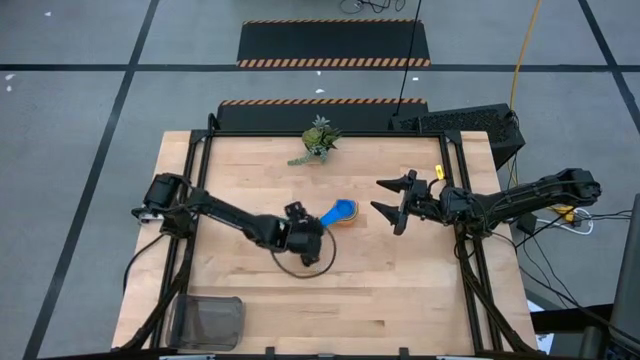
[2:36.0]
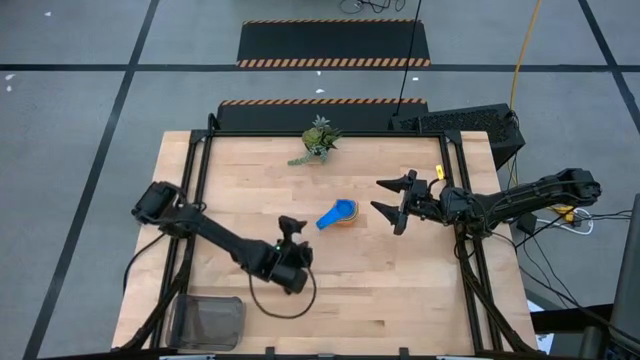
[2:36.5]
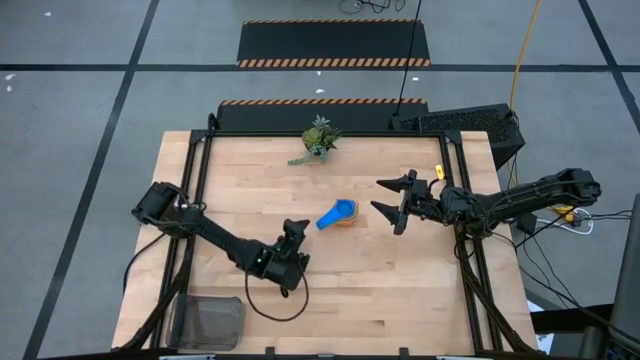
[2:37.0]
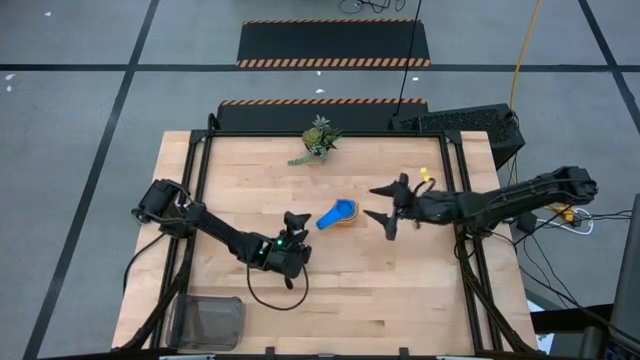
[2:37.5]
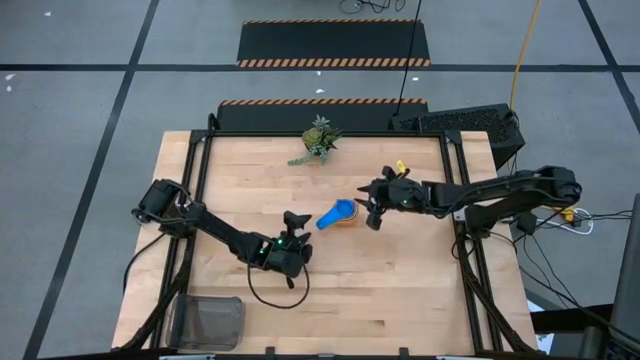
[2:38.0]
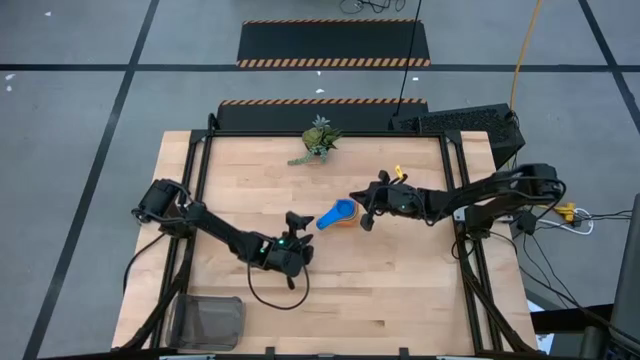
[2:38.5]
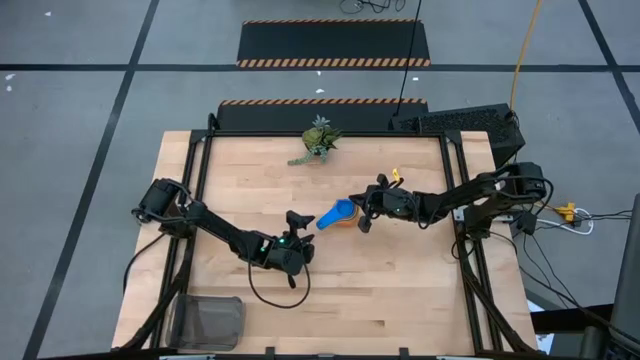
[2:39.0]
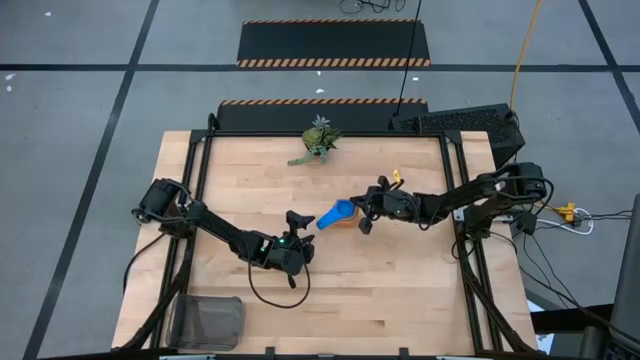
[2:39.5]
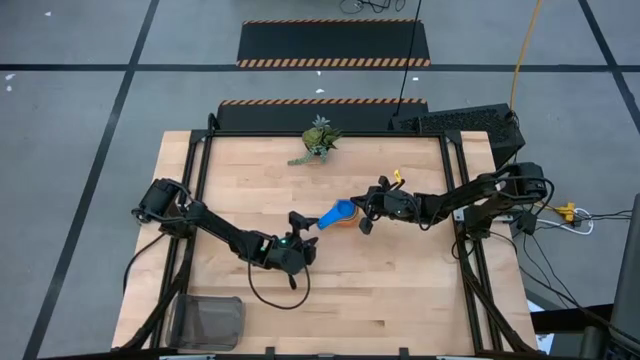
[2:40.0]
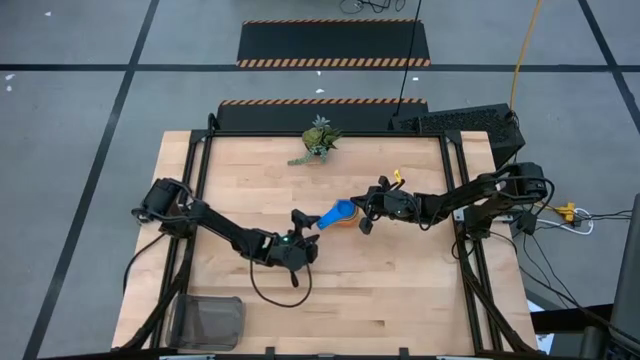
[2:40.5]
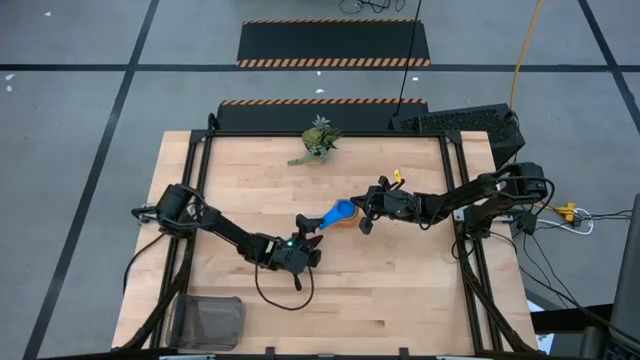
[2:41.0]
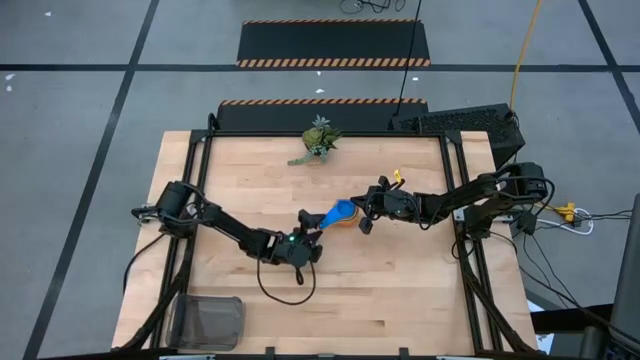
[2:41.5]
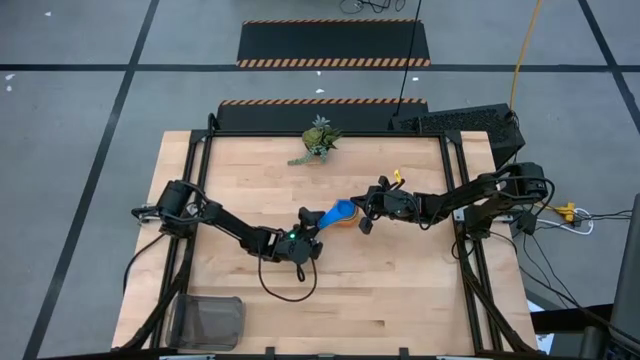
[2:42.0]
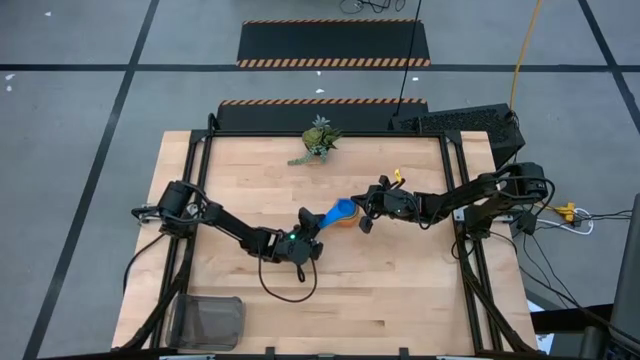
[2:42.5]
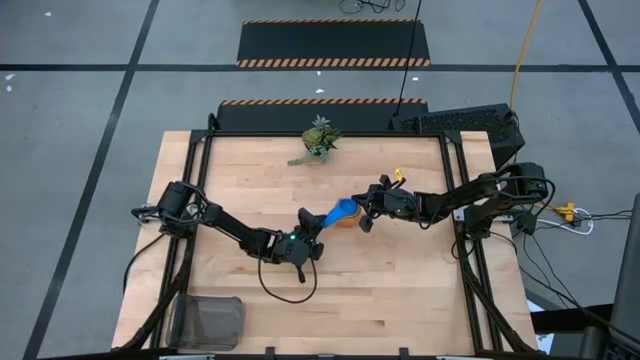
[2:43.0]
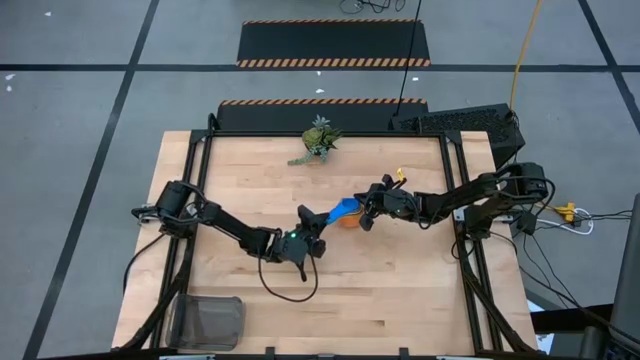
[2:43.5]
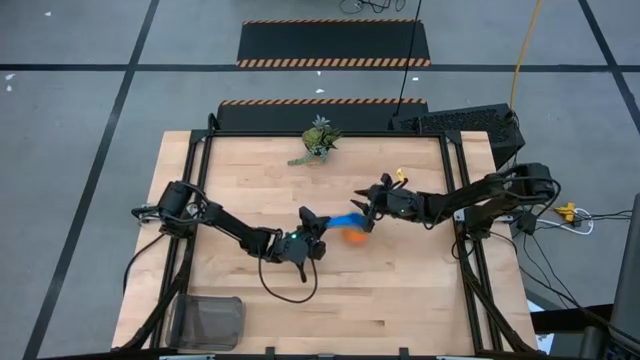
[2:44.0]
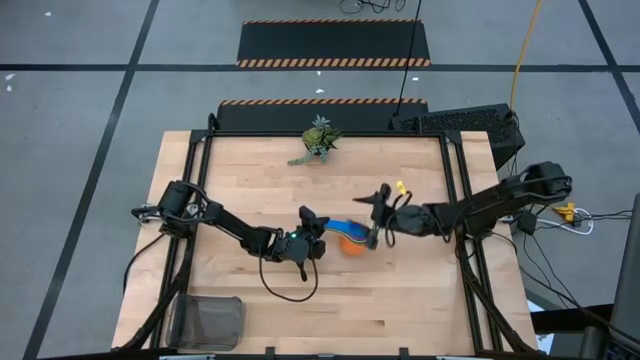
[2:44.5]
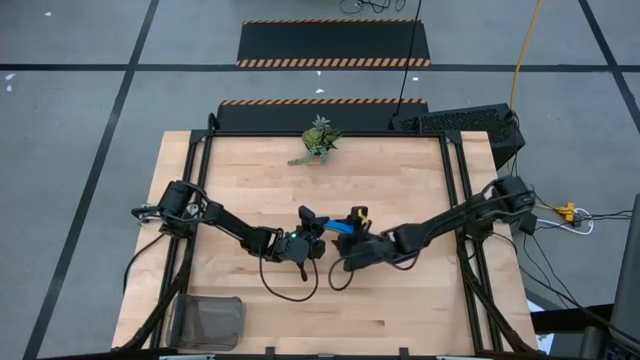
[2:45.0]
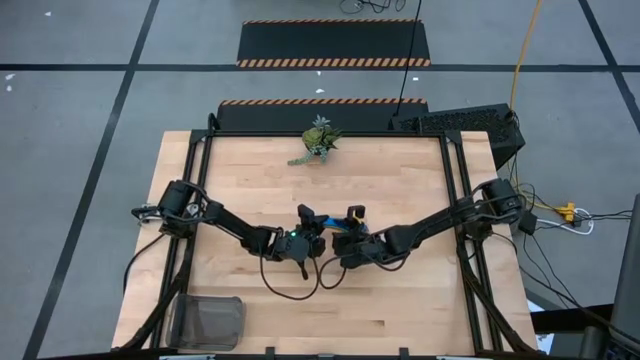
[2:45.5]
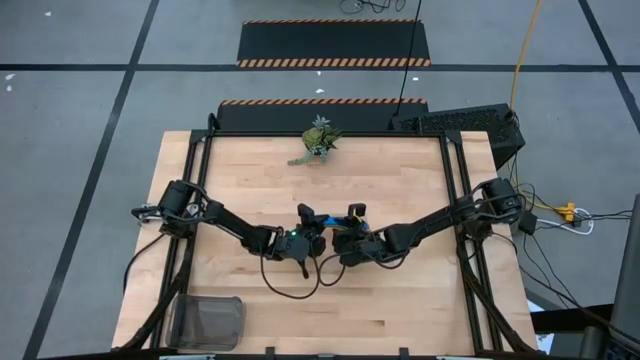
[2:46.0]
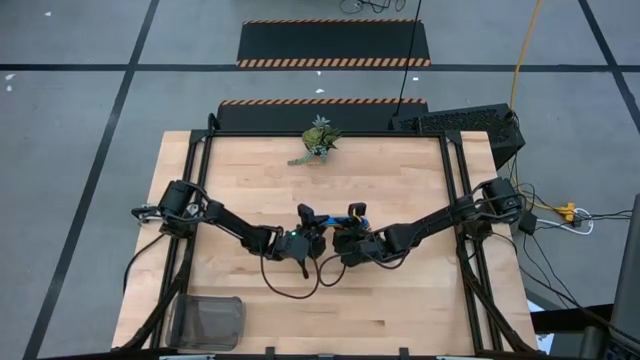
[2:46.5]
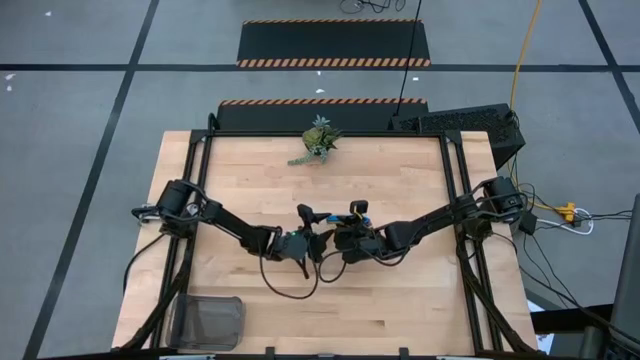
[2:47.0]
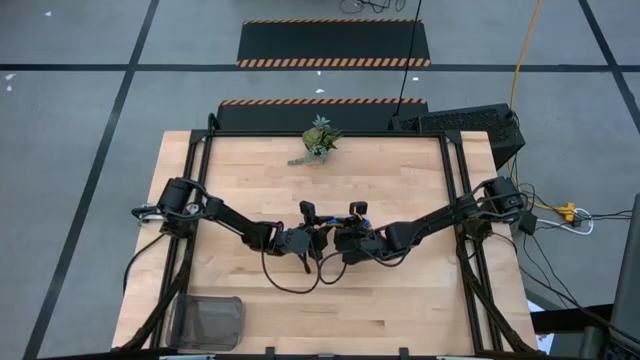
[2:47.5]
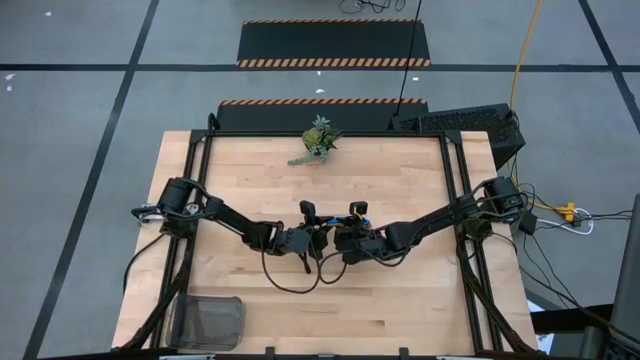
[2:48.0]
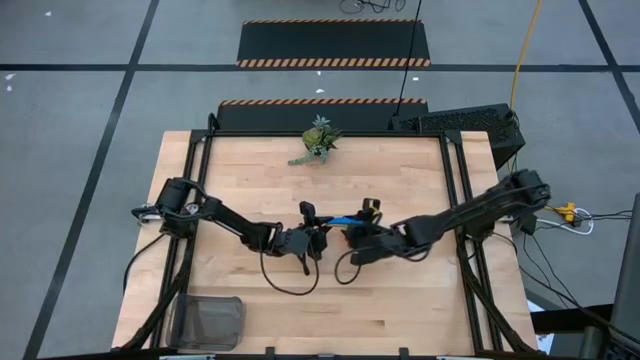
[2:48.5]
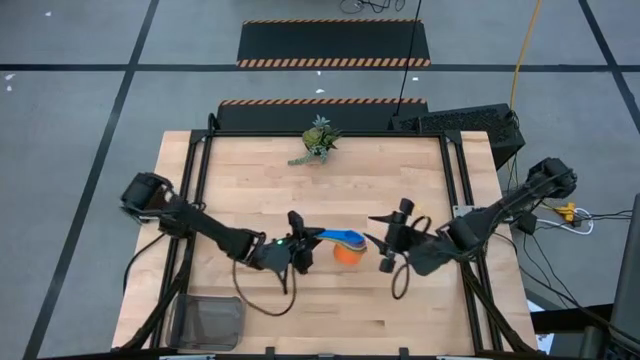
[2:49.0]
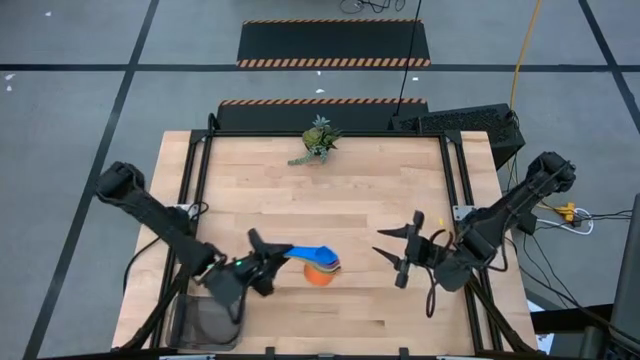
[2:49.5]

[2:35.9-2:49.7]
Task: Nest measuring cups in basket
Put the nested measuring cups into the black bin

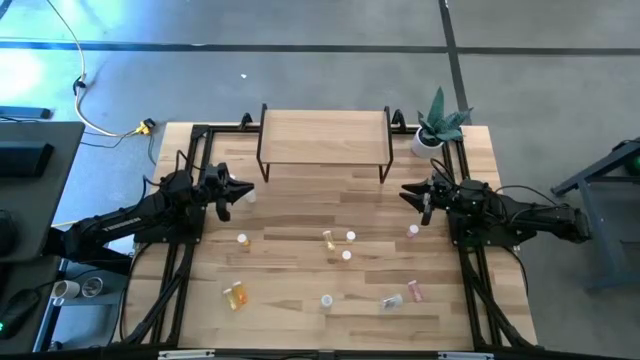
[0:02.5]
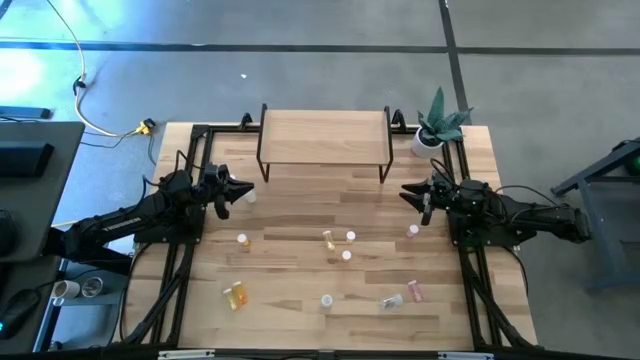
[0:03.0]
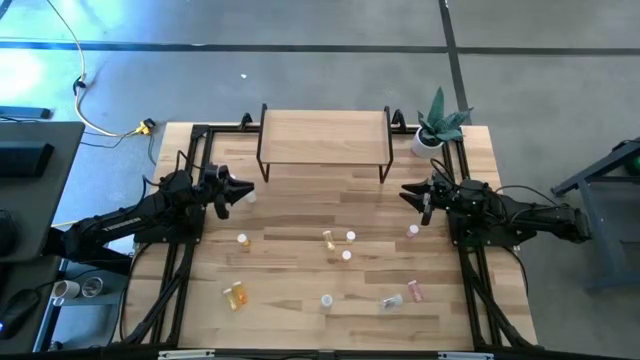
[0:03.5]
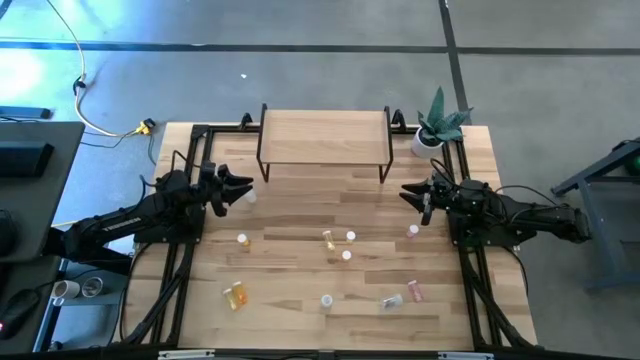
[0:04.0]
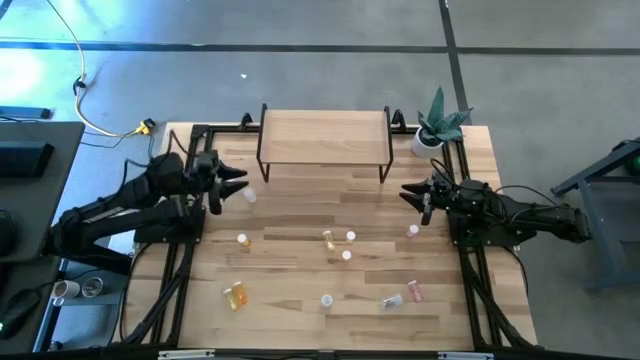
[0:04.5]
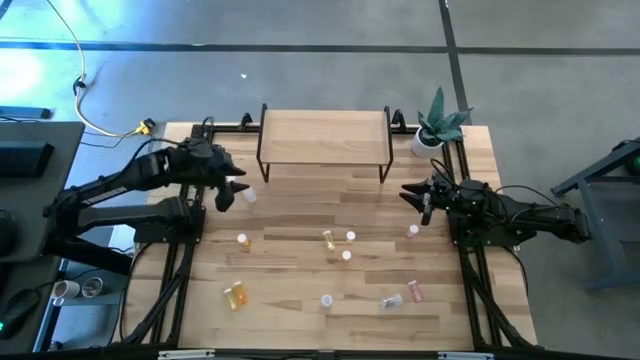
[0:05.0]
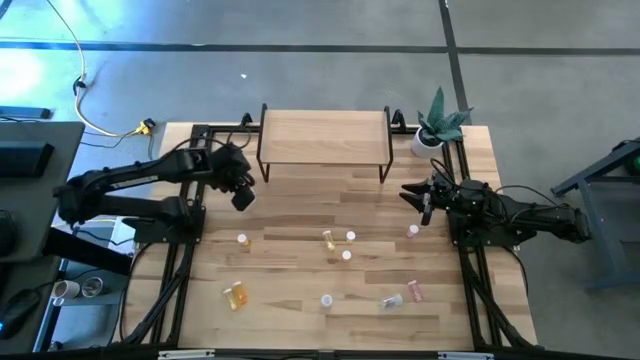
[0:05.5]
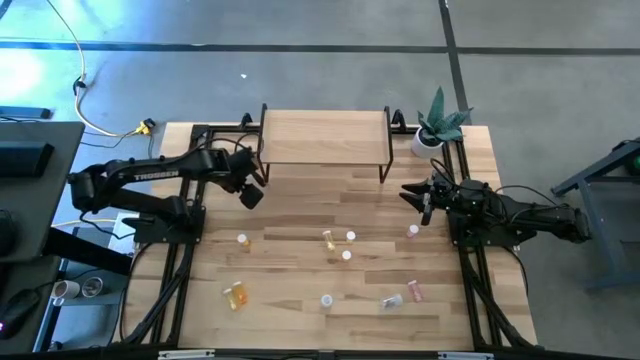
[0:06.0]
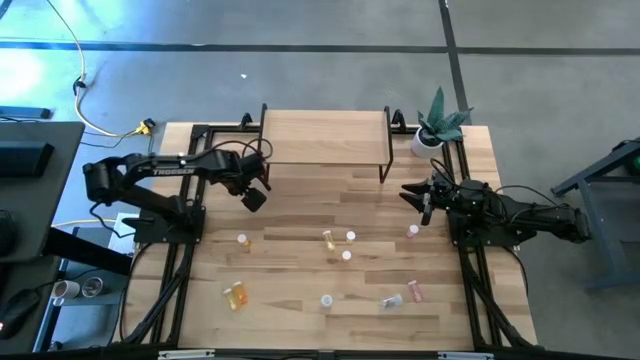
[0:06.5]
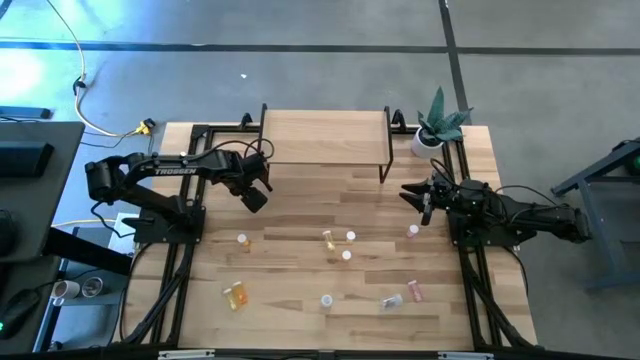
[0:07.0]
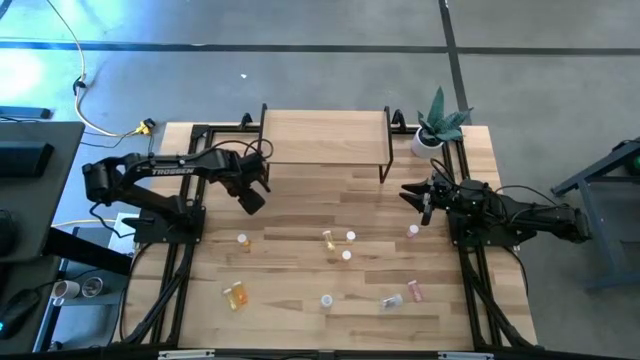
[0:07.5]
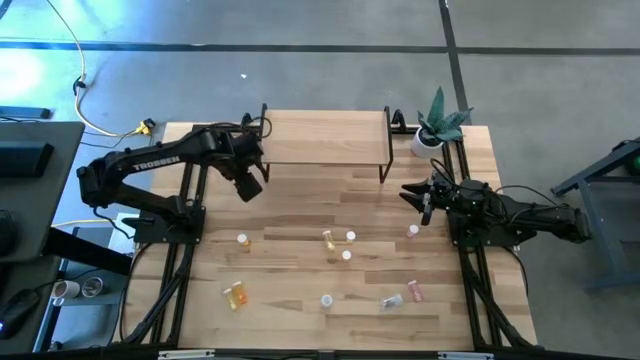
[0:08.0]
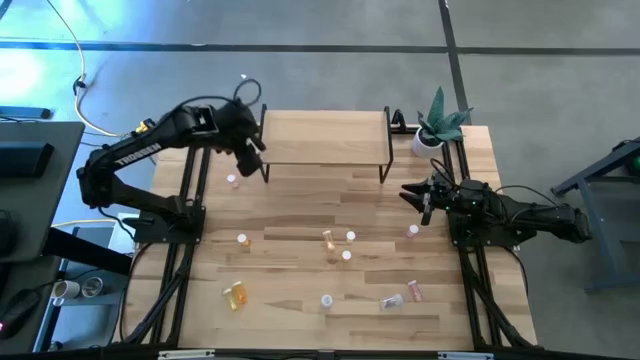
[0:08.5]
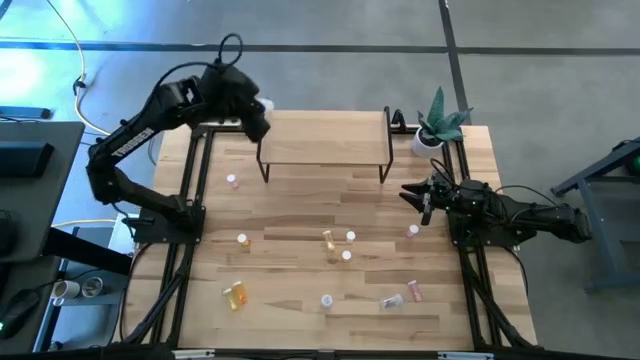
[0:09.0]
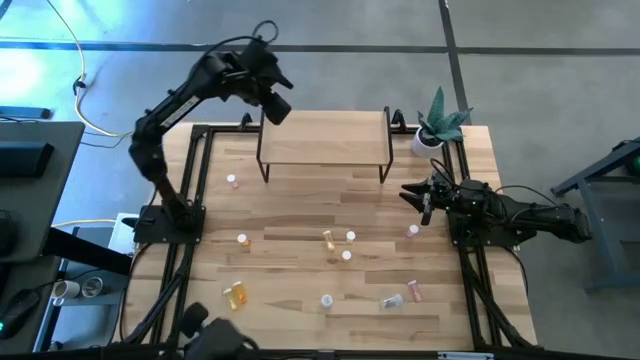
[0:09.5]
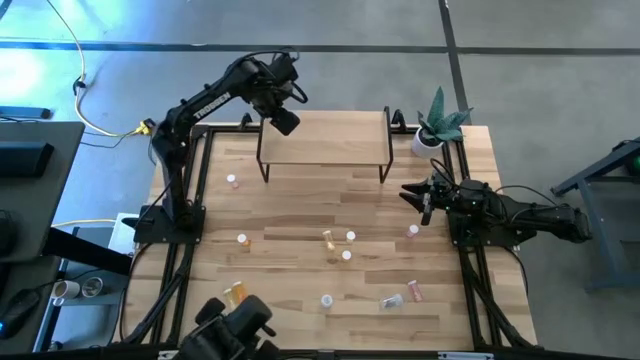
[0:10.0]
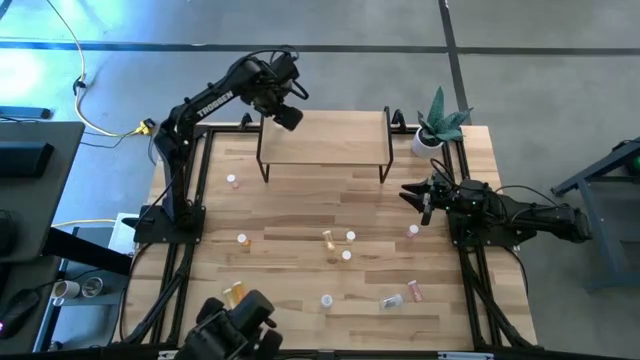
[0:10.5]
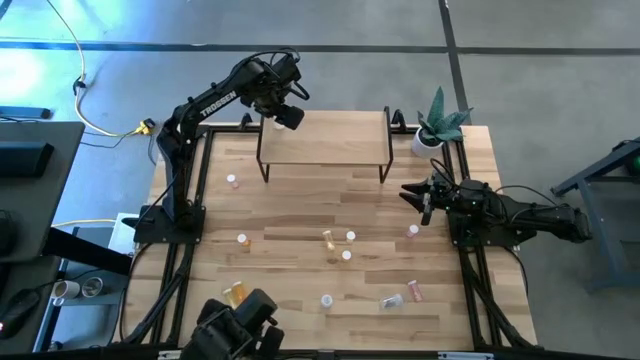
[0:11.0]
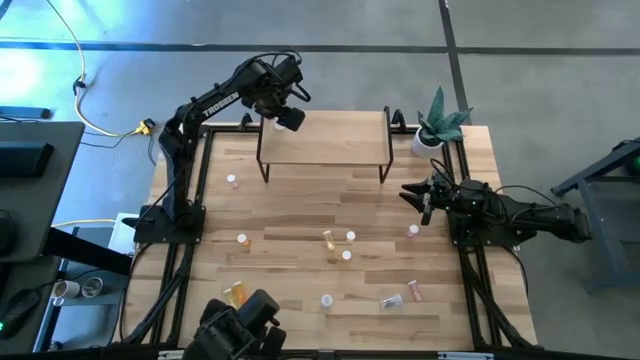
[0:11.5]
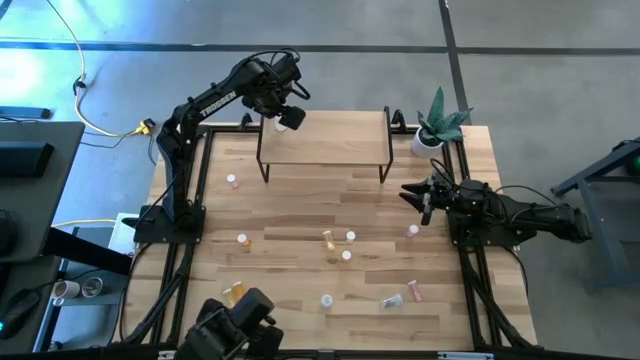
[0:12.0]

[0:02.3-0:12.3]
Task: Pick and place medicine bottles onto shelf by color
Put the top transparent pill bottle on the shelf
